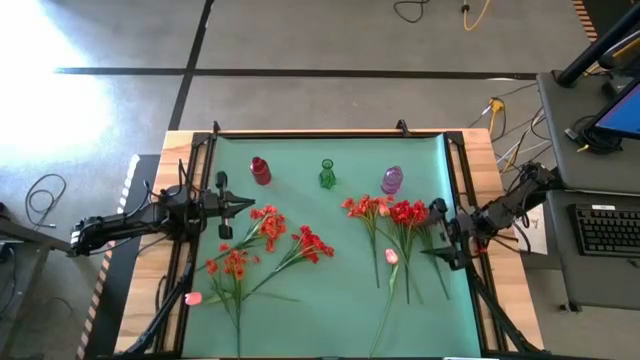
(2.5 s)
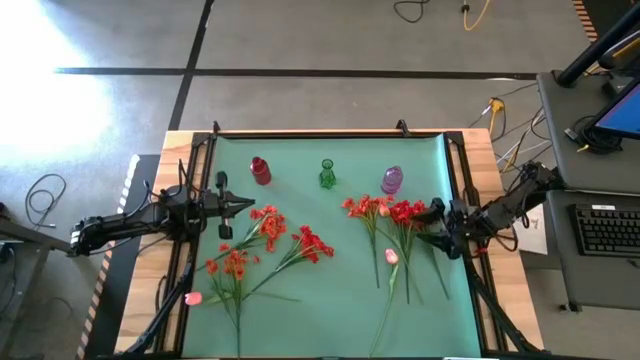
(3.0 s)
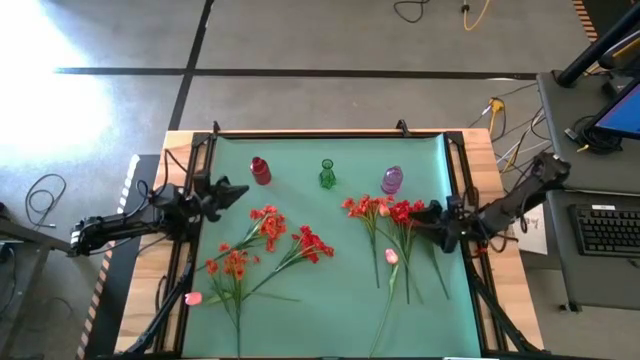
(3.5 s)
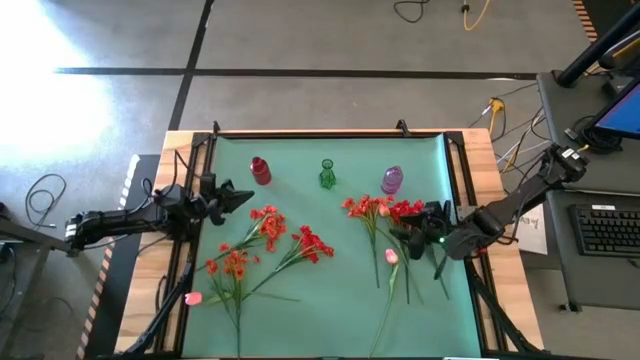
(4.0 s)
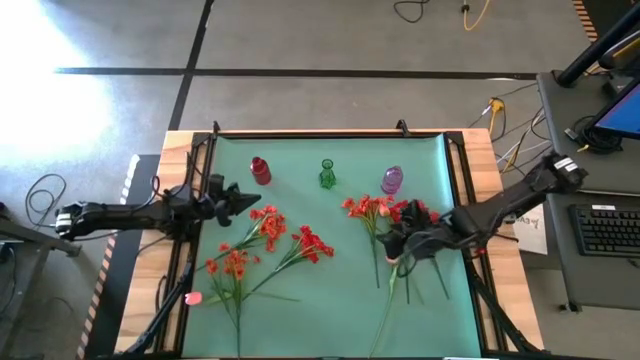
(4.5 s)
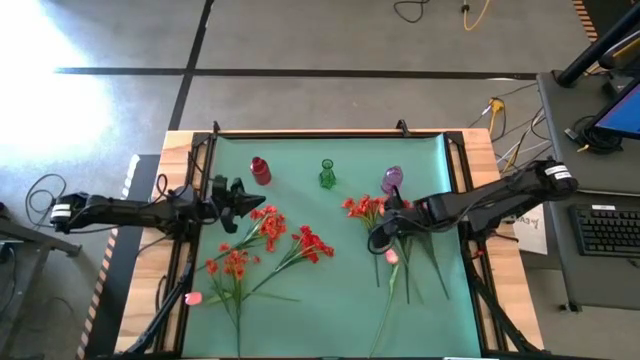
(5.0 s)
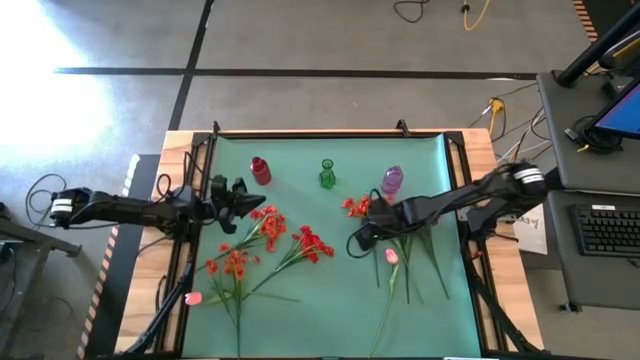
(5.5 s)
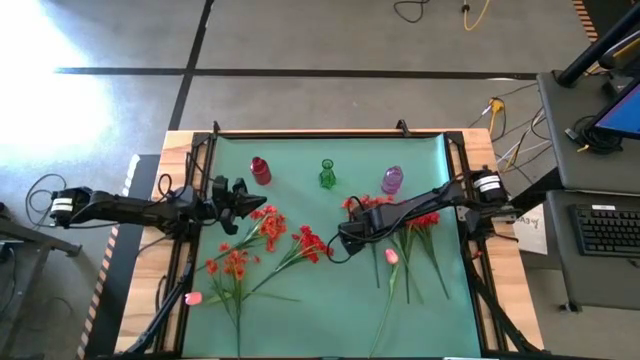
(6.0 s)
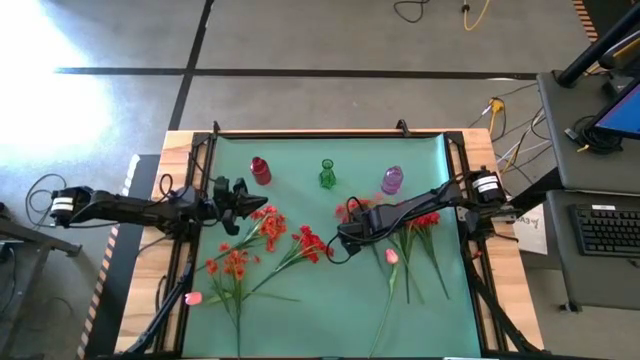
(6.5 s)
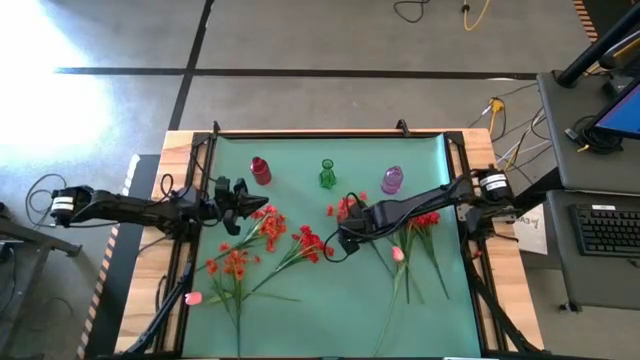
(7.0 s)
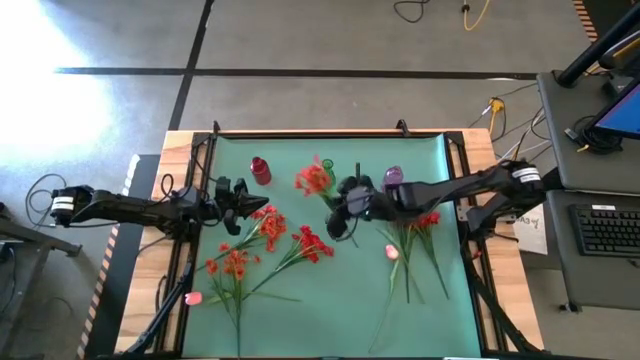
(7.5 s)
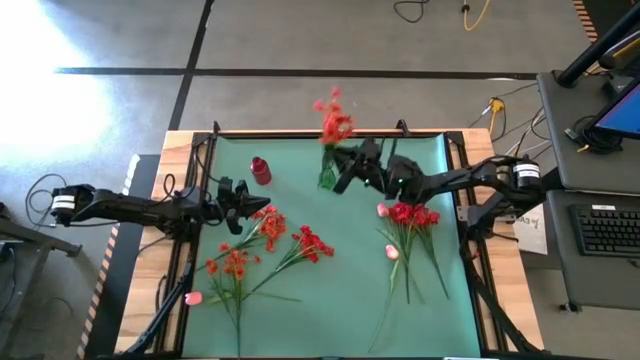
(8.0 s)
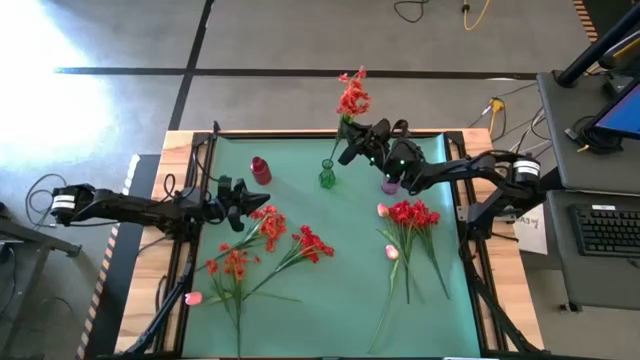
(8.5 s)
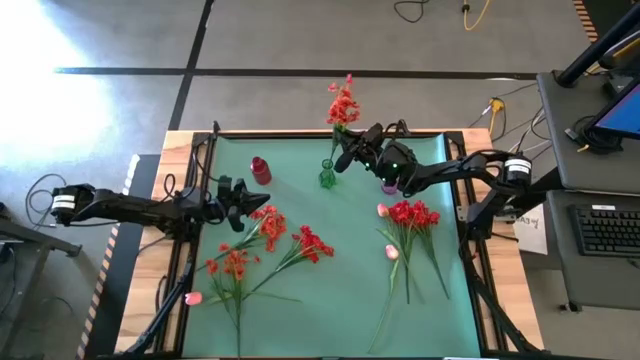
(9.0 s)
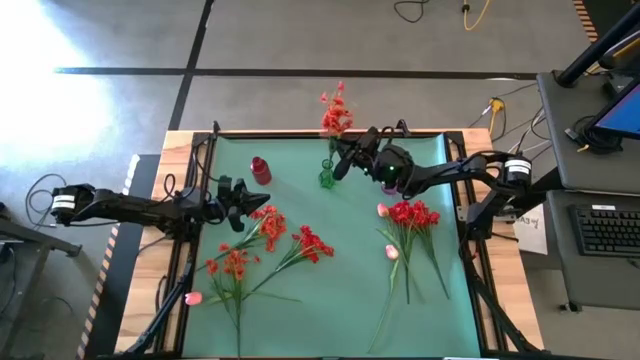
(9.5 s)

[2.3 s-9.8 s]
Task: Sort flowers into vase by color
Put the middle right orange flower in the green flower vase

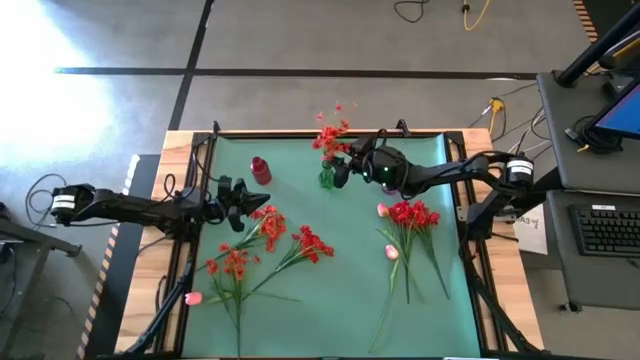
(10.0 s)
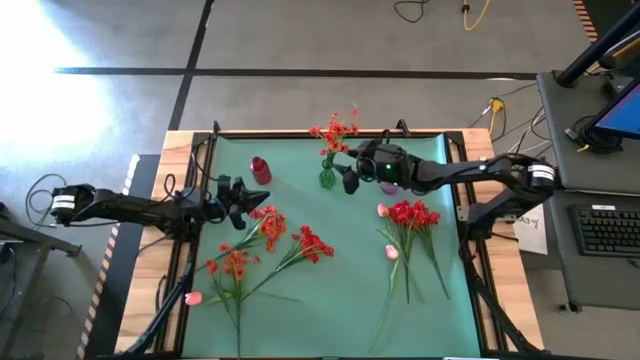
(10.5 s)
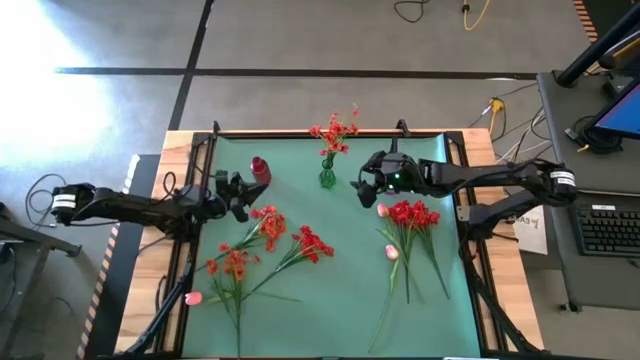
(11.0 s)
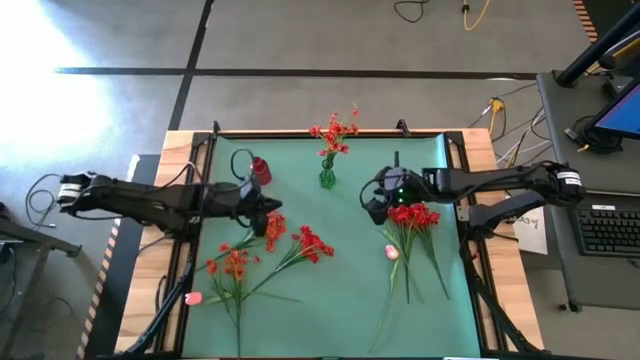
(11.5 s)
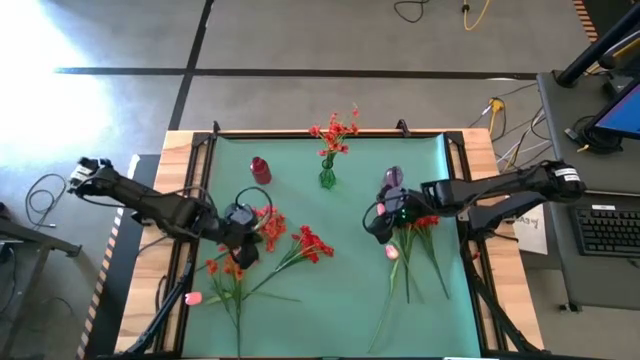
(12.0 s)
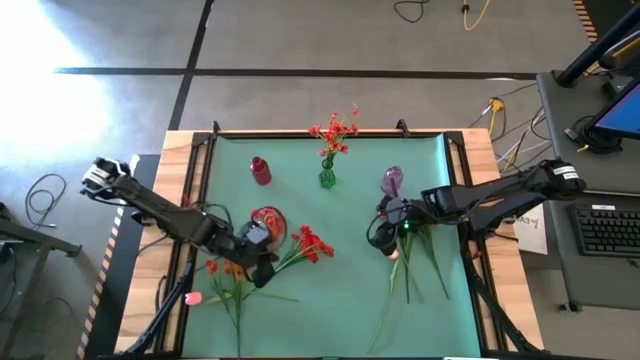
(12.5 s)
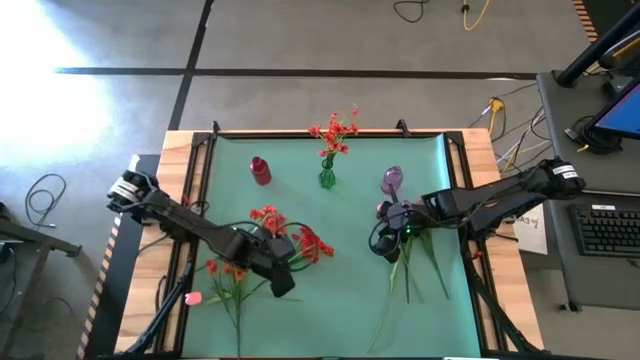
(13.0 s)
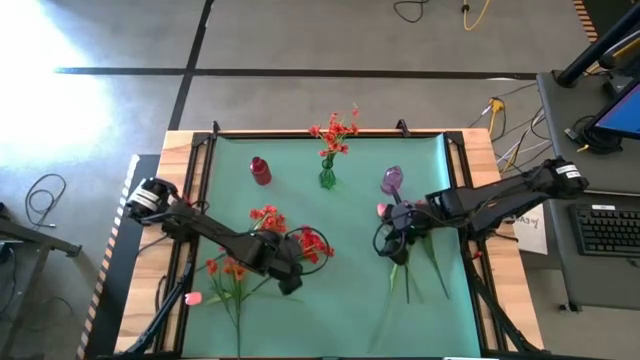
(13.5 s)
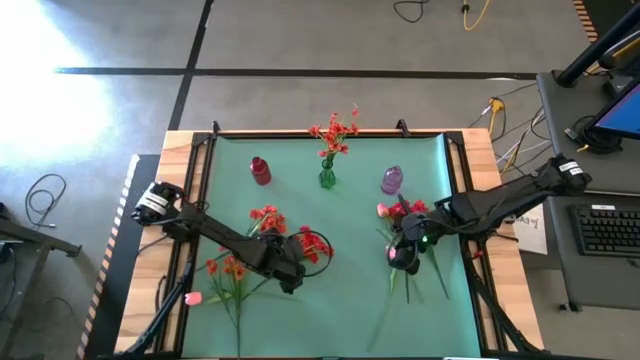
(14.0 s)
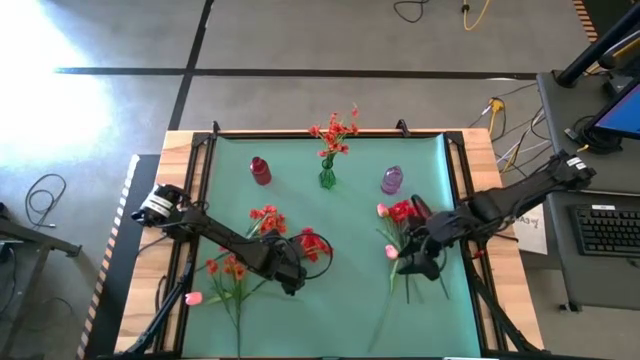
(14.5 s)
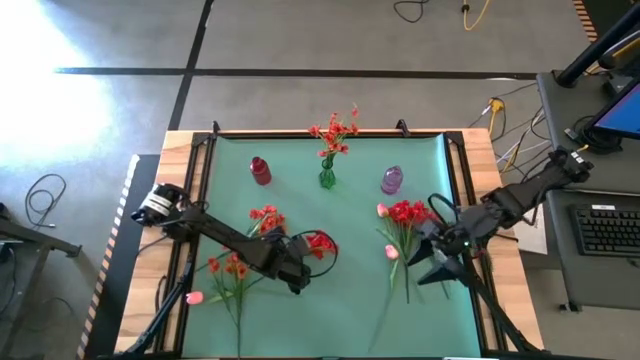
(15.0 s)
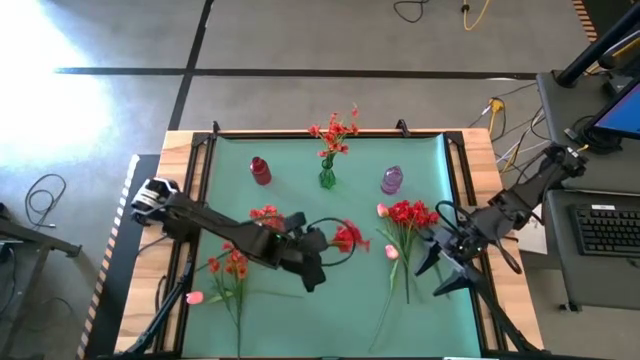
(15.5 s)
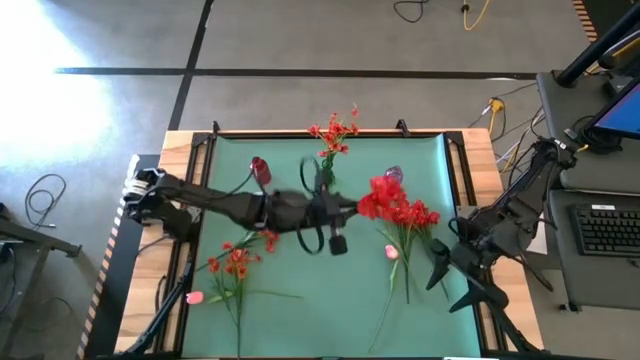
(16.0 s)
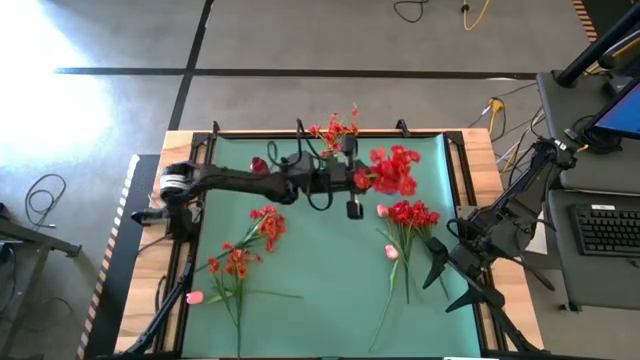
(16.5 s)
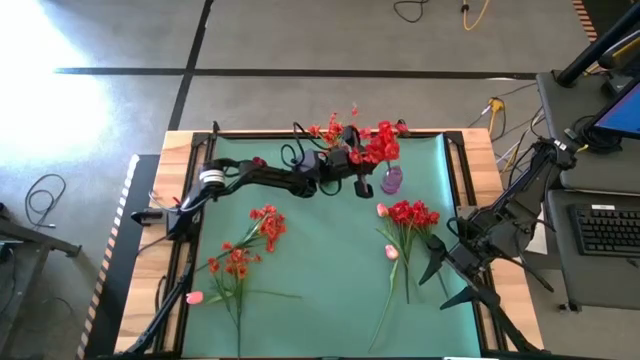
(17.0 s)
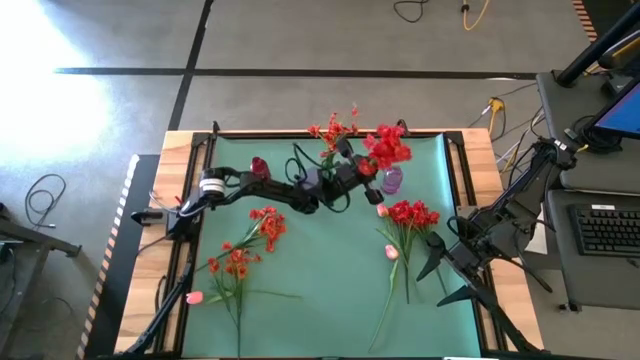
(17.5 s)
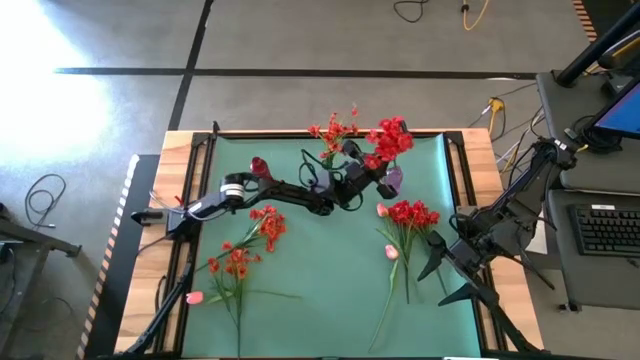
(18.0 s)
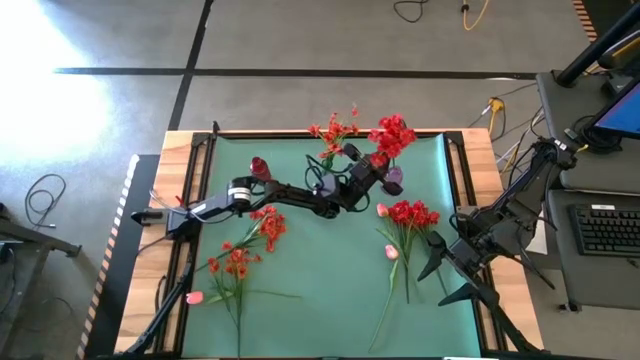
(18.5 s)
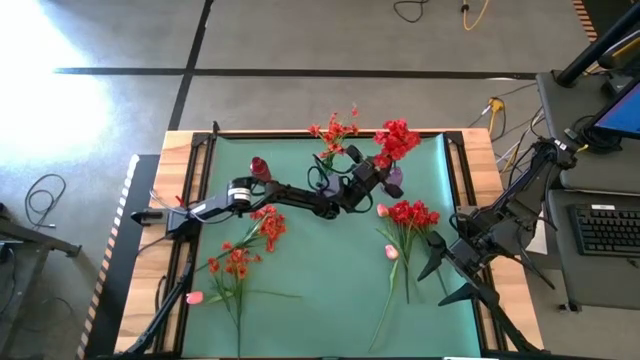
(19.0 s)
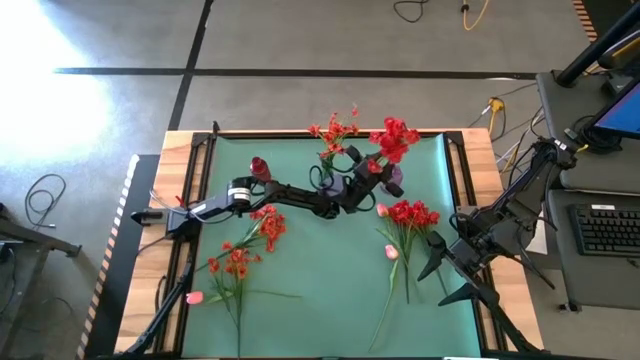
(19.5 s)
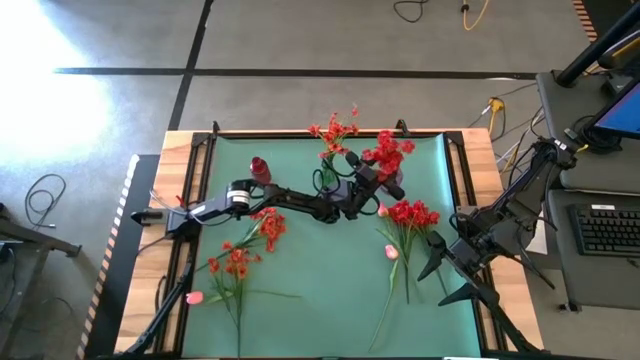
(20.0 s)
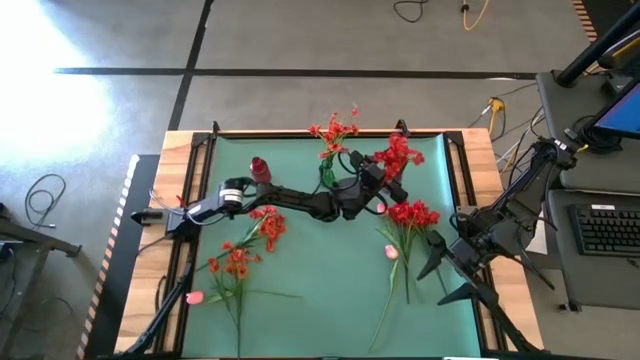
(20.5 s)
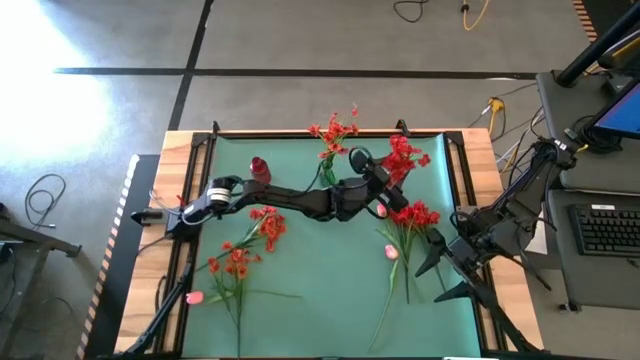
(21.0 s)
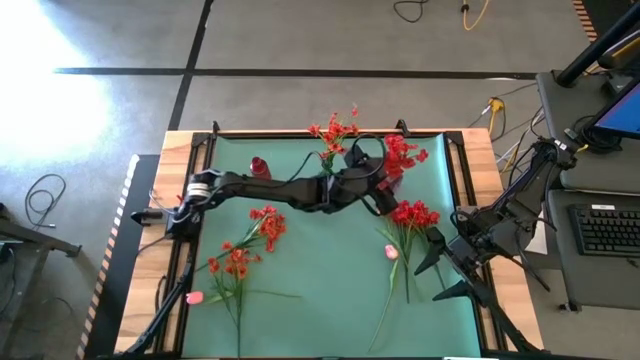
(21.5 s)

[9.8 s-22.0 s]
Put the middle left red flower in the violet flower vase
